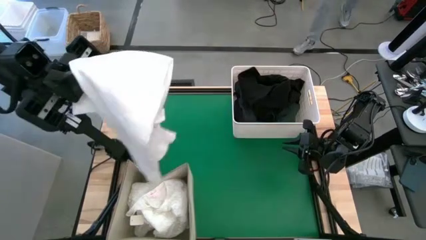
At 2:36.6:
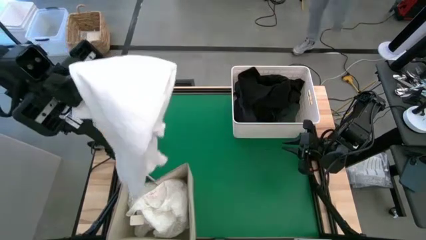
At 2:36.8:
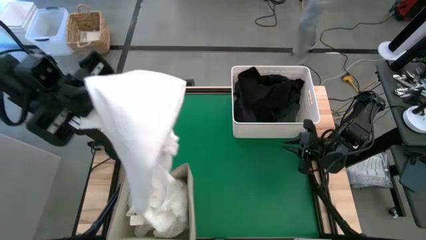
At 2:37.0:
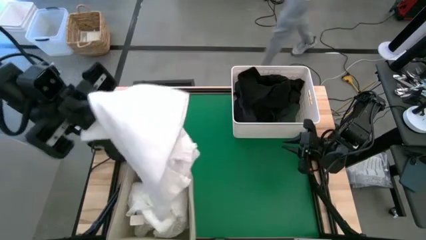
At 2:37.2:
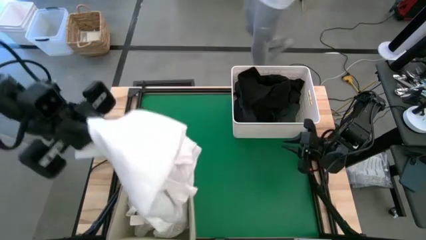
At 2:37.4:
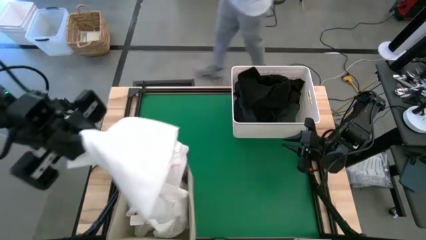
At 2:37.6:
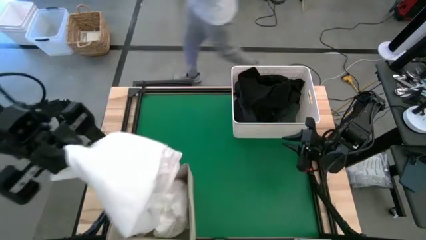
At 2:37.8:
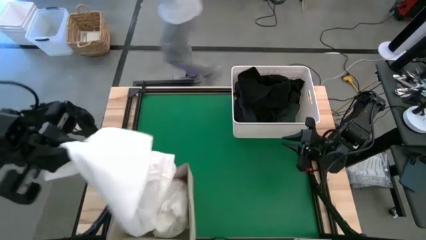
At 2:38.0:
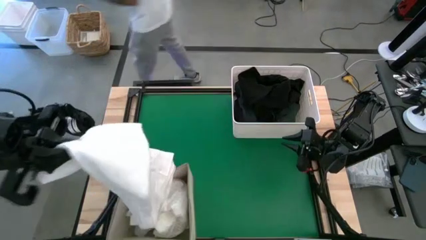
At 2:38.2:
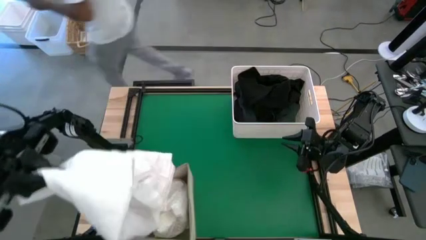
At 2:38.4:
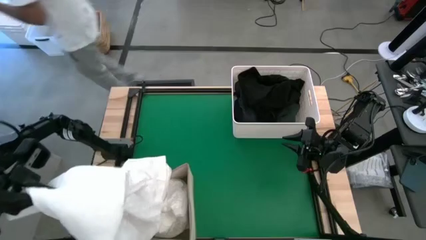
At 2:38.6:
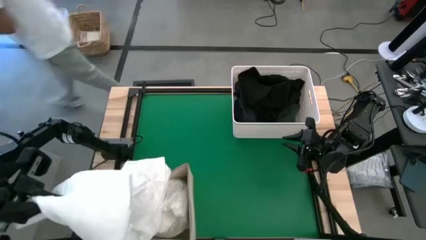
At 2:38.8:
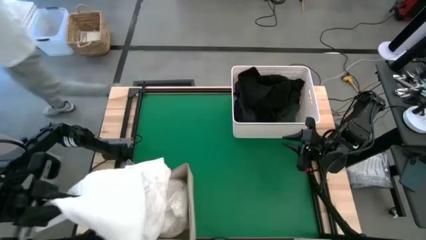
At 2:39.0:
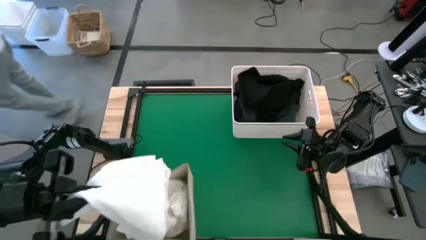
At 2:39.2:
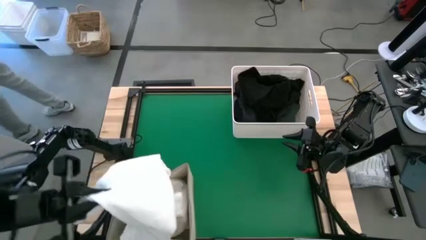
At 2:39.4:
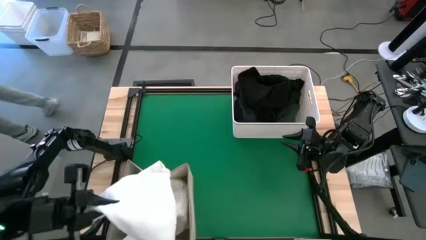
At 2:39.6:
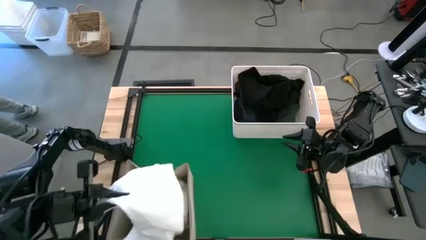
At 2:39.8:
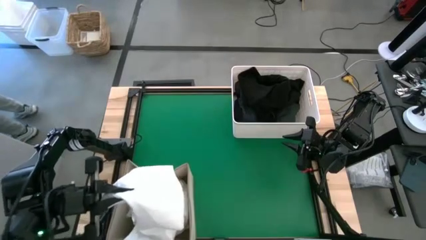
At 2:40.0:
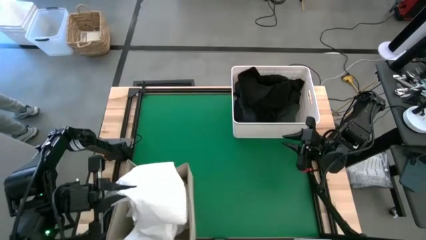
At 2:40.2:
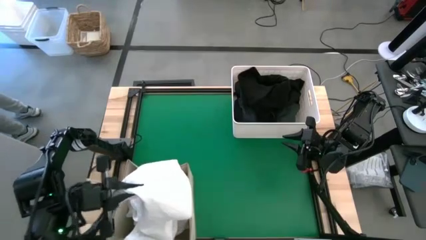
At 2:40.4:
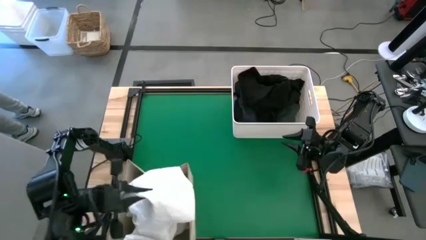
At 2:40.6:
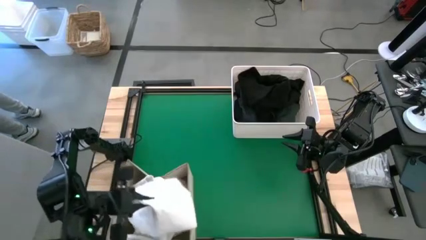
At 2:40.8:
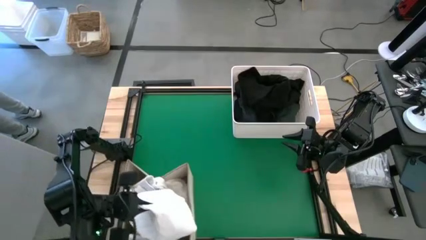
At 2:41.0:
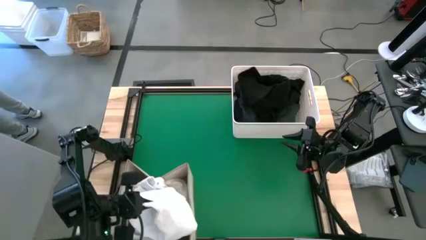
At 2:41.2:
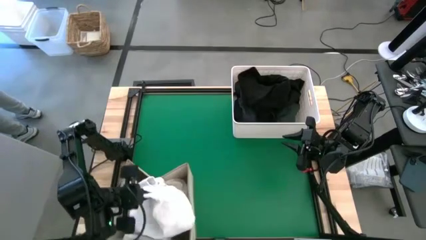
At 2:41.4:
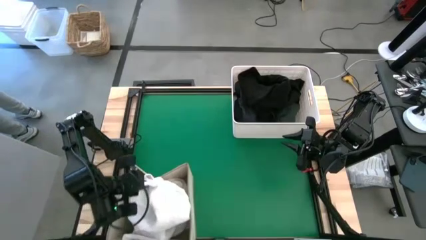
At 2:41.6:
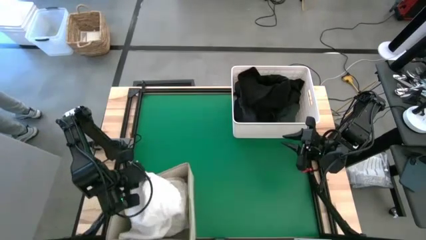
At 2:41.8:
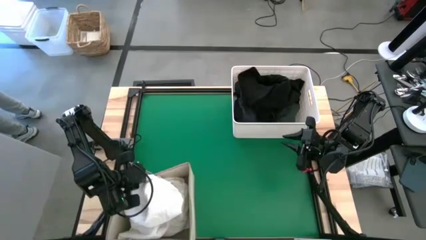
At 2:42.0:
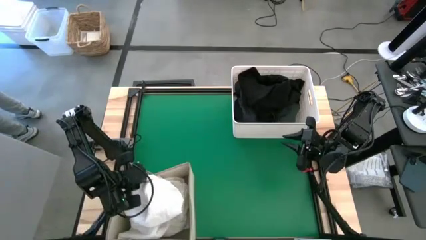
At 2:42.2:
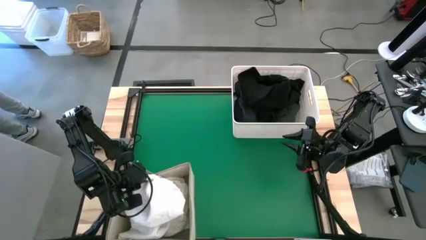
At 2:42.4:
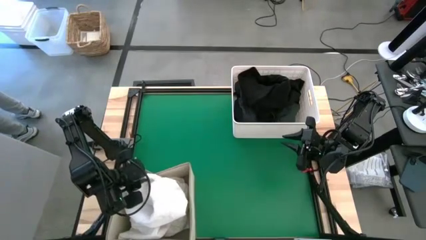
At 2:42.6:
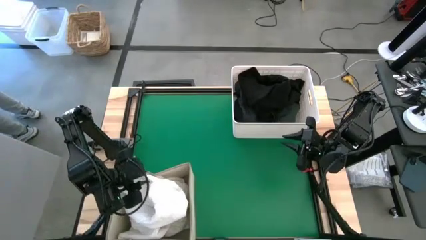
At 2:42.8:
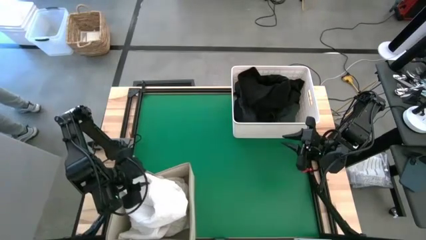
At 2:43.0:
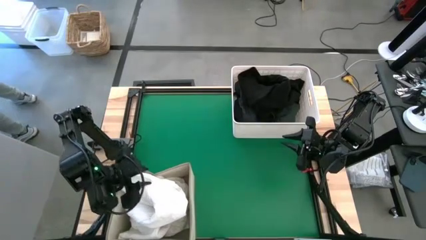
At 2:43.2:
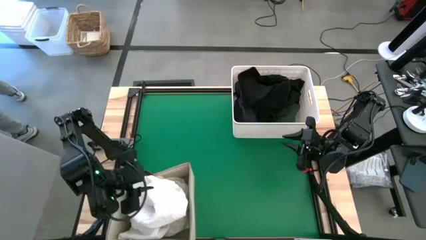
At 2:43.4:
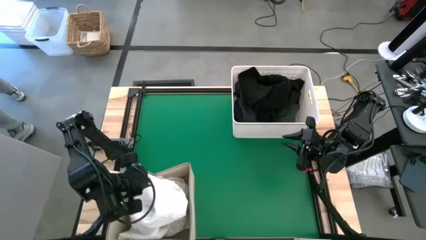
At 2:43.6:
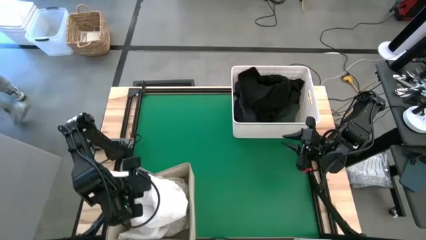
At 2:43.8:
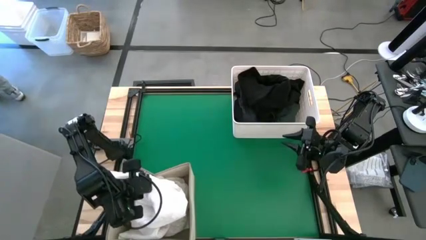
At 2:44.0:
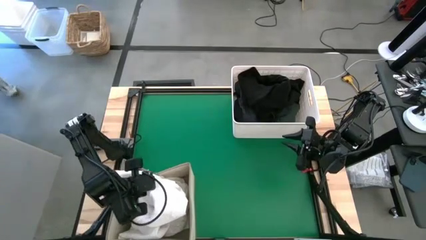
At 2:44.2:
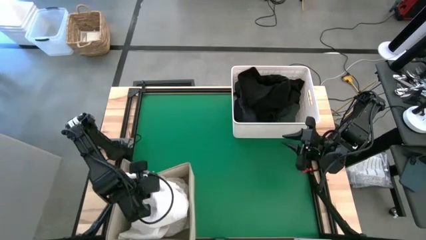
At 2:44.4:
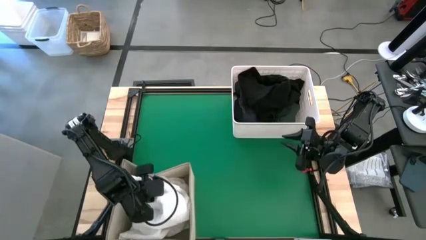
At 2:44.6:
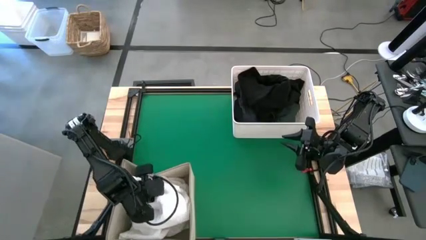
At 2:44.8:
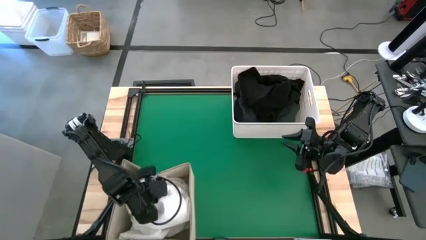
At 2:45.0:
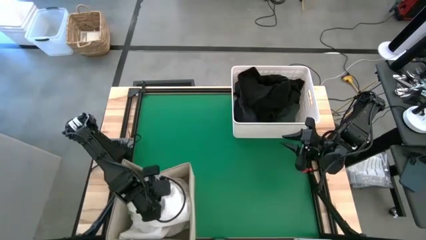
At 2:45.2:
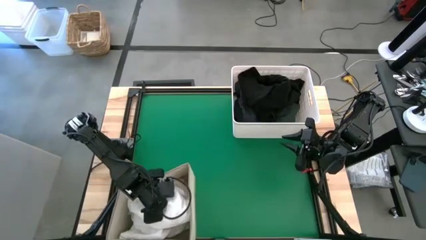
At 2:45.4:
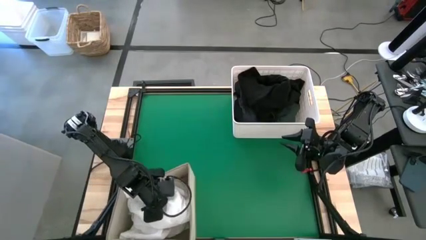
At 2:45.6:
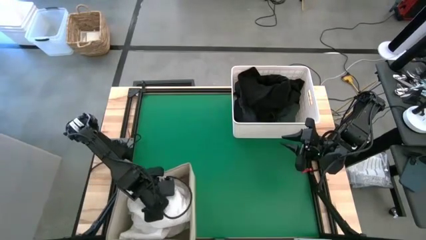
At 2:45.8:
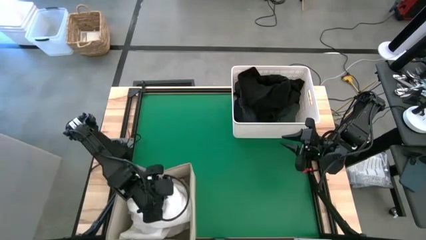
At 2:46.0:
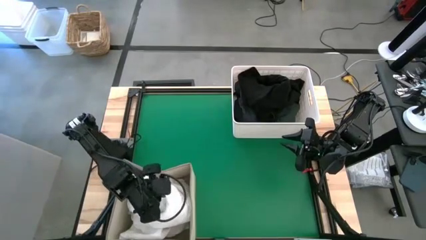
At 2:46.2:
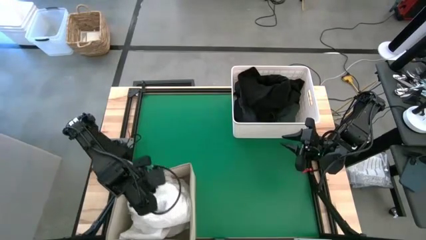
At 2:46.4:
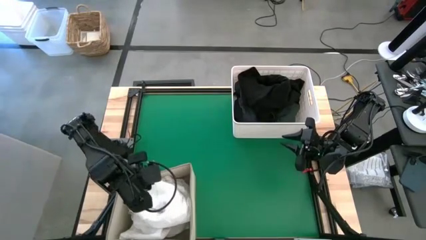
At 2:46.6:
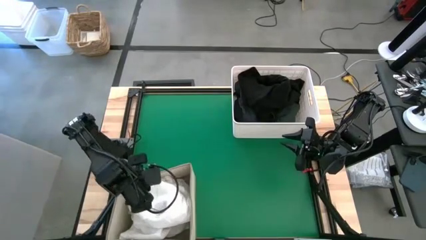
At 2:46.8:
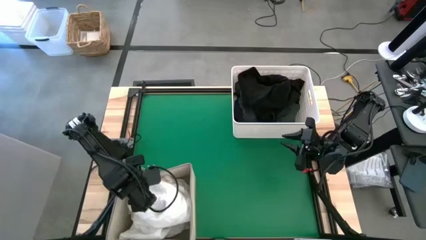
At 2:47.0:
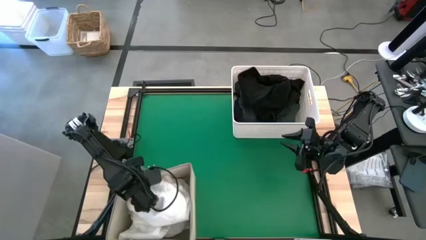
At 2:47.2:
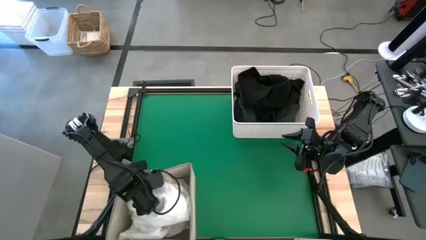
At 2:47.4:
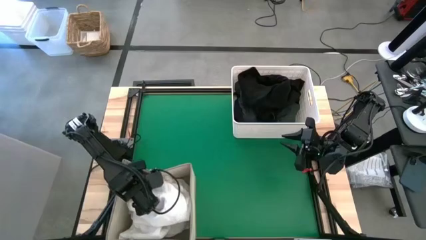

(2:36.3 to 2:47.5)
Task: Sort clothes
Put the white polo shirt into the bottom left white bin

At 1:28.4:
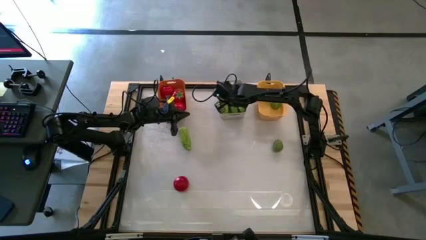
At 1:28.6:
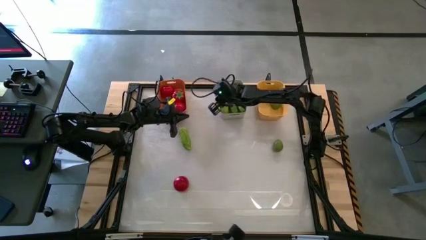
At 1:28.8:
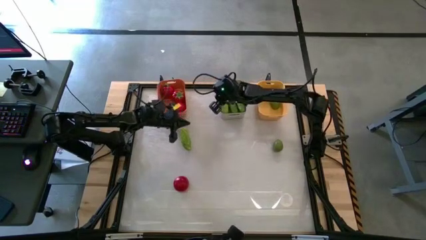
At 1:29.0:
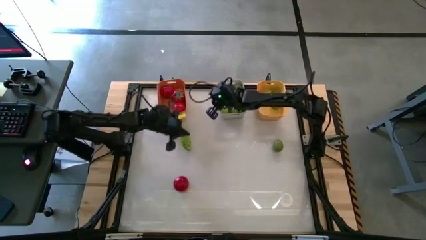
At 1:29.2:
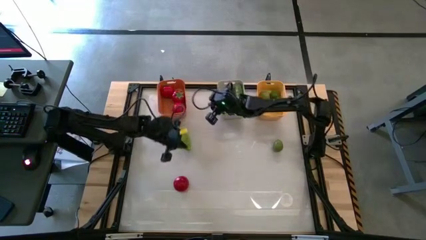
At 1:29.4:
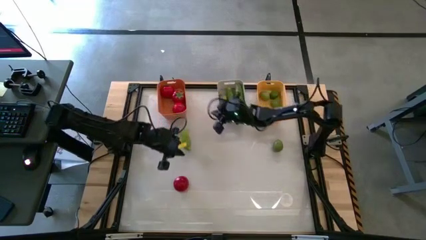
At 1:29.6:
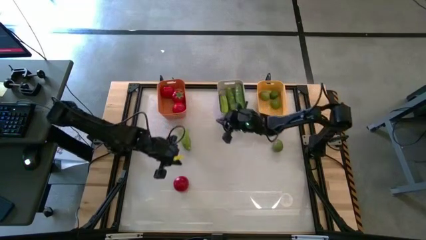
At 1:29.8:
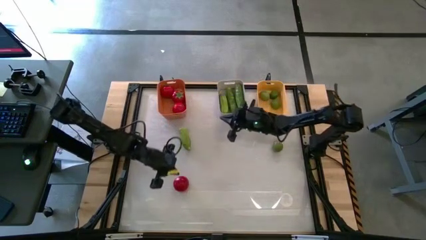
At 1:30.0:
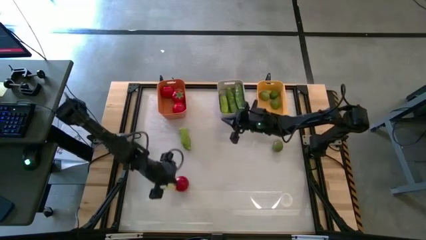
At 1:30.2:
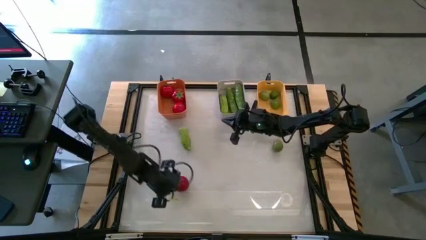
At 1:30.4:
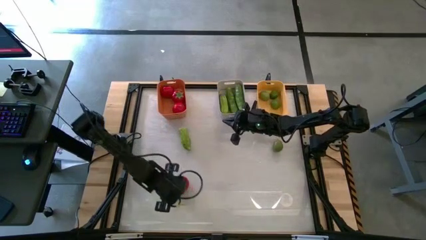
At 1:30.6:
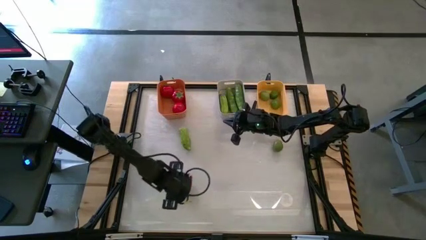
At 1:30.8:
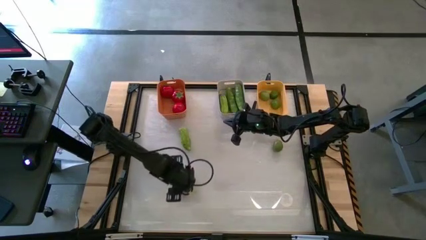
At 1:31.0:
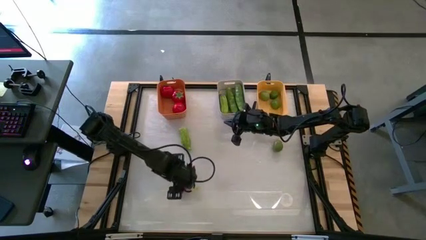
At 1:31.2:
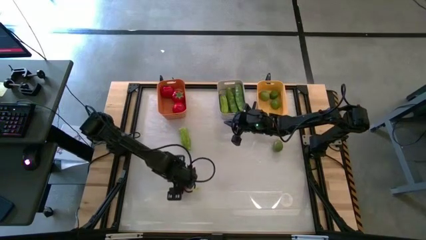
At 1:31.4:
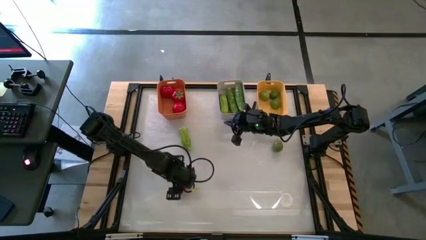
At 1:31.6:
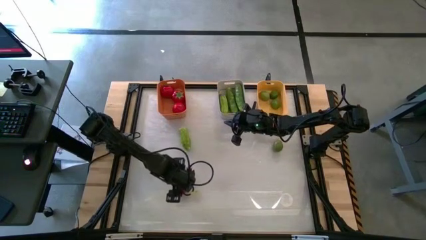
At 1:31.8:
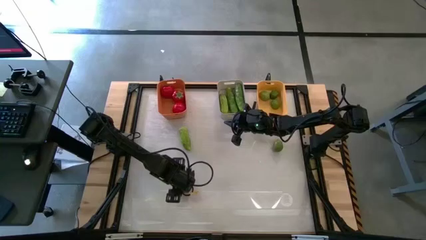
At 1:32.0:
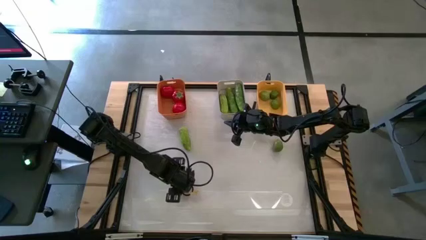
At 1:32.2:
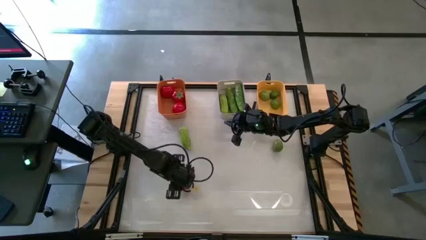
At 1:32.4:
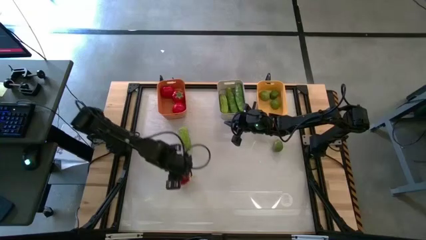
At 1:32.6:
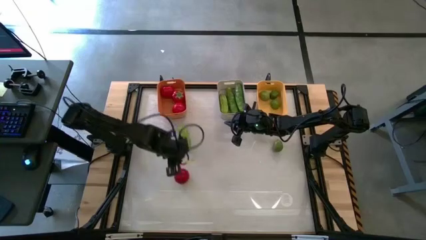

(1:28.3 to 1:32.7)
Task: Sort produce into baskets
Put the tomato into the orange bin
